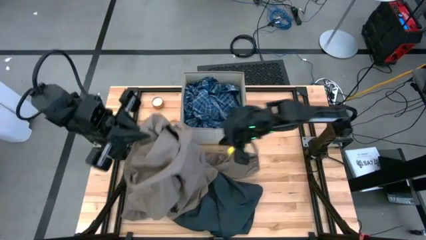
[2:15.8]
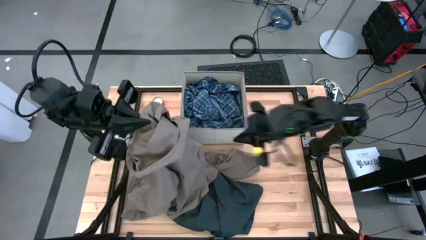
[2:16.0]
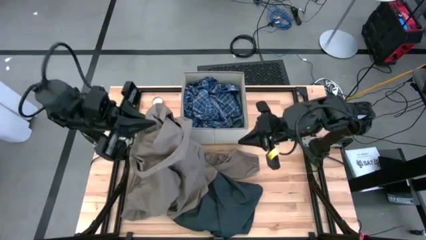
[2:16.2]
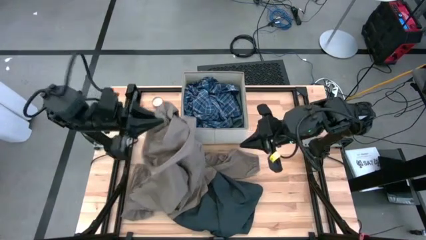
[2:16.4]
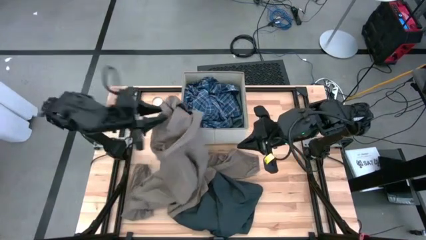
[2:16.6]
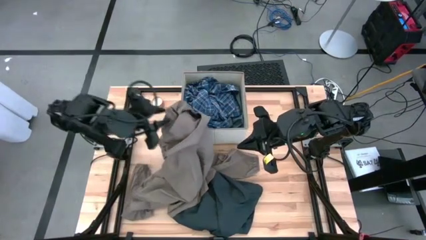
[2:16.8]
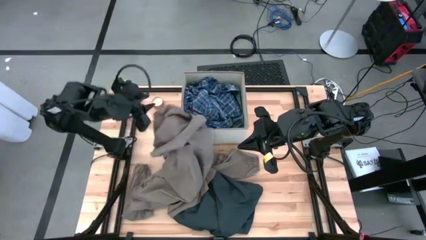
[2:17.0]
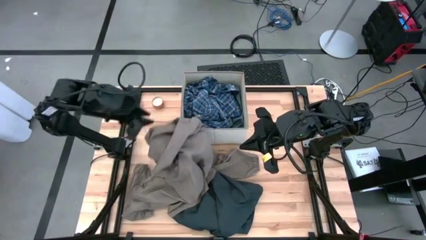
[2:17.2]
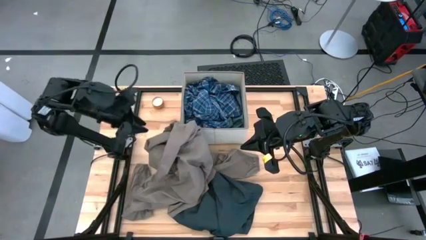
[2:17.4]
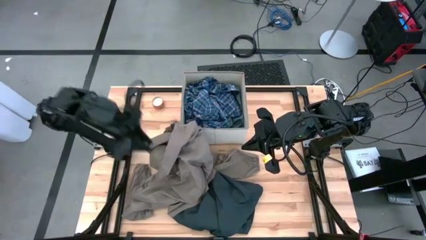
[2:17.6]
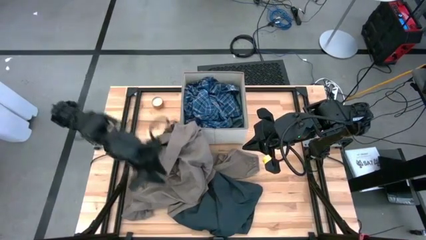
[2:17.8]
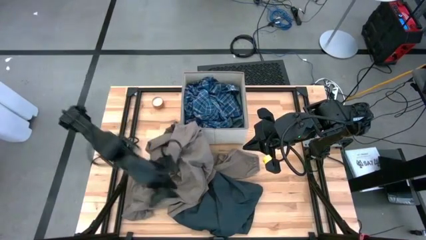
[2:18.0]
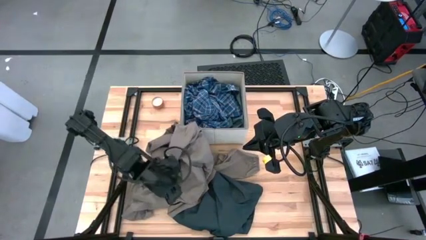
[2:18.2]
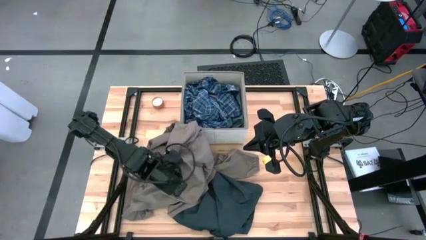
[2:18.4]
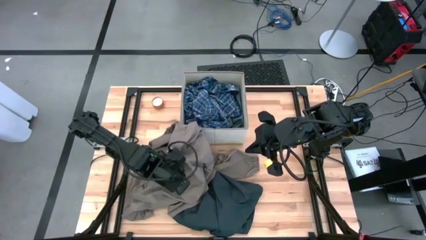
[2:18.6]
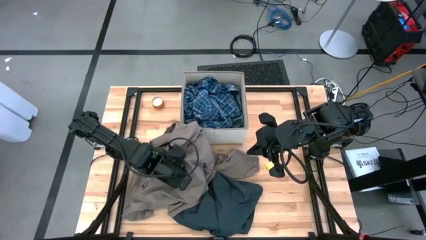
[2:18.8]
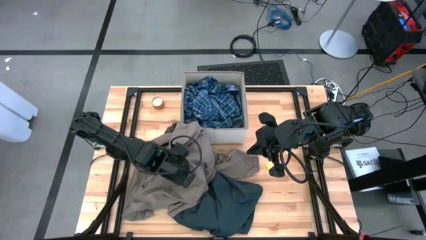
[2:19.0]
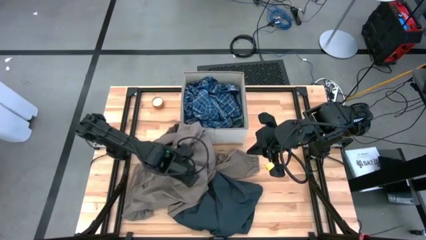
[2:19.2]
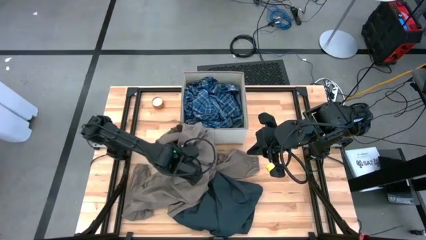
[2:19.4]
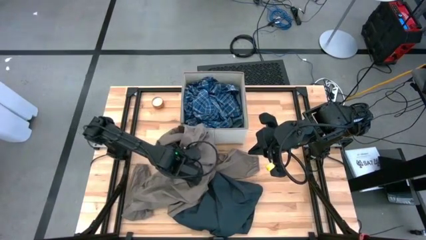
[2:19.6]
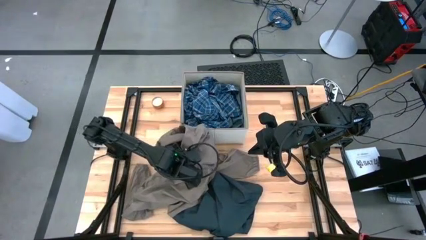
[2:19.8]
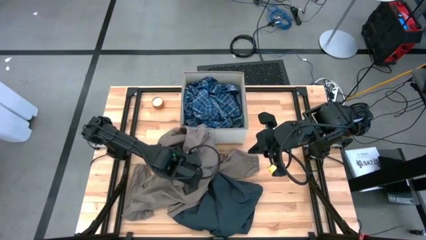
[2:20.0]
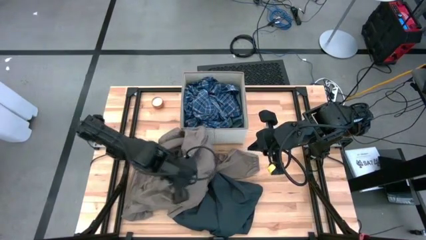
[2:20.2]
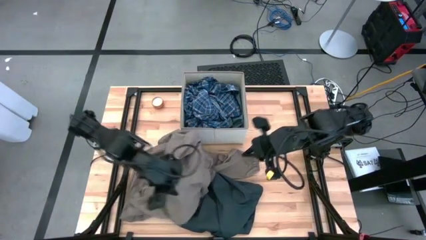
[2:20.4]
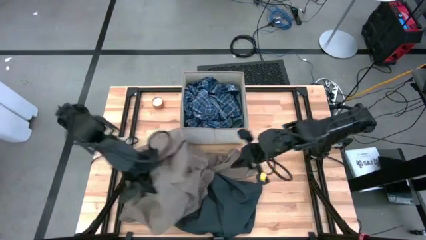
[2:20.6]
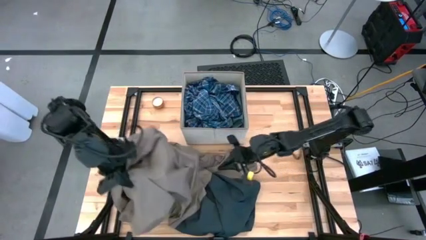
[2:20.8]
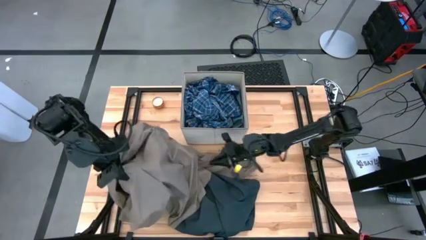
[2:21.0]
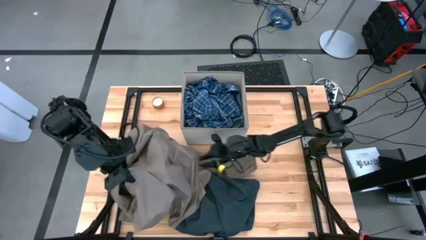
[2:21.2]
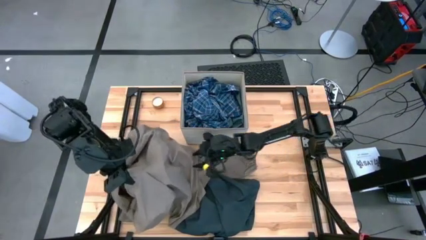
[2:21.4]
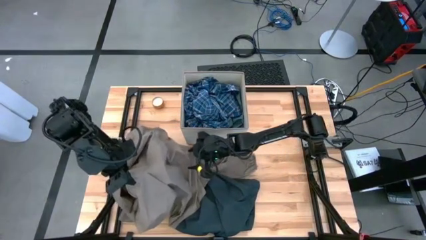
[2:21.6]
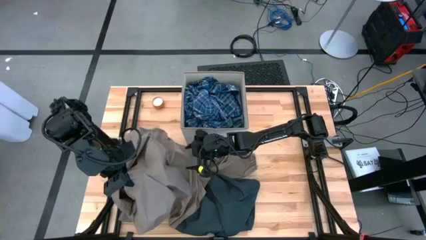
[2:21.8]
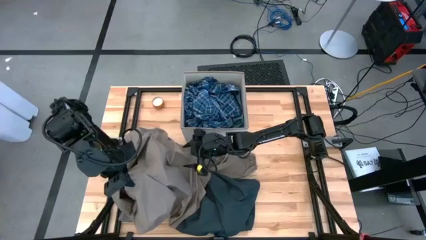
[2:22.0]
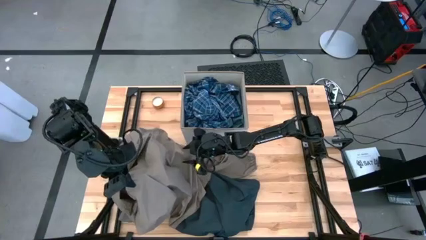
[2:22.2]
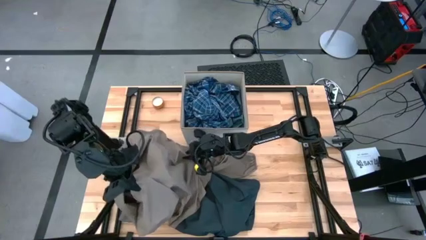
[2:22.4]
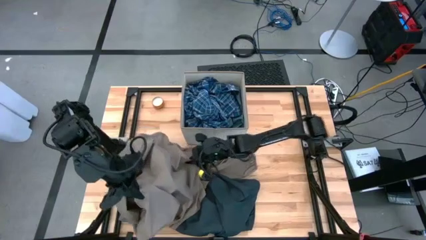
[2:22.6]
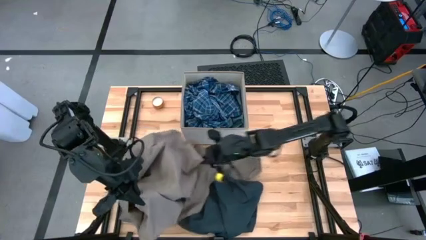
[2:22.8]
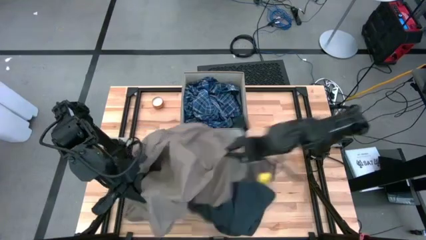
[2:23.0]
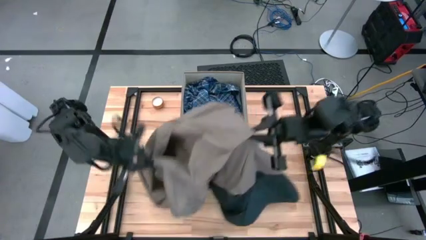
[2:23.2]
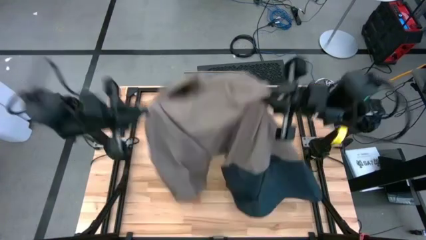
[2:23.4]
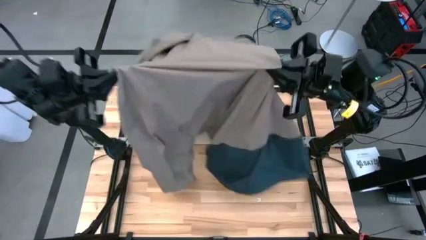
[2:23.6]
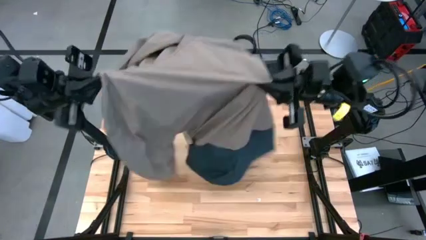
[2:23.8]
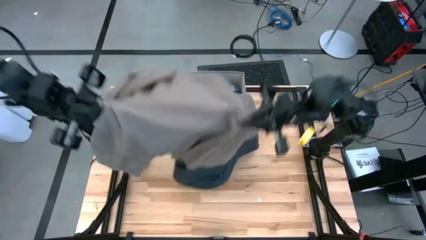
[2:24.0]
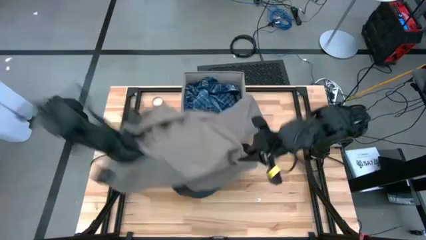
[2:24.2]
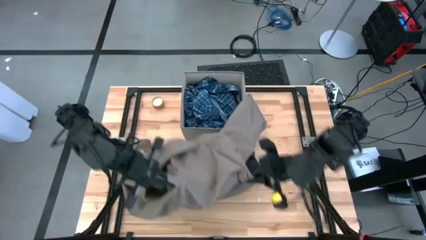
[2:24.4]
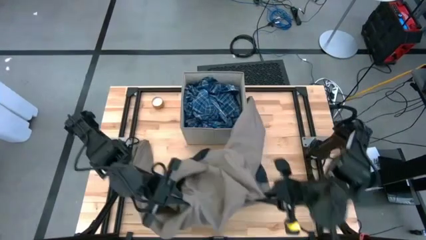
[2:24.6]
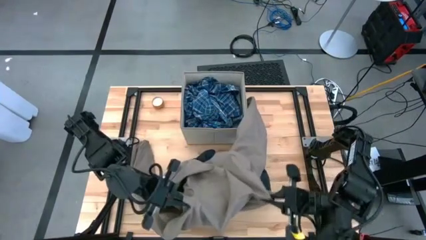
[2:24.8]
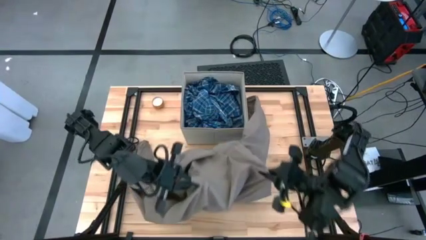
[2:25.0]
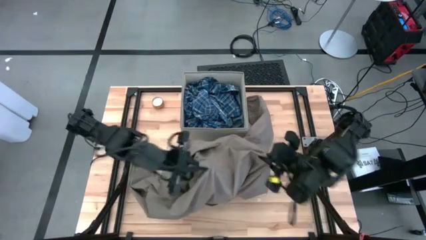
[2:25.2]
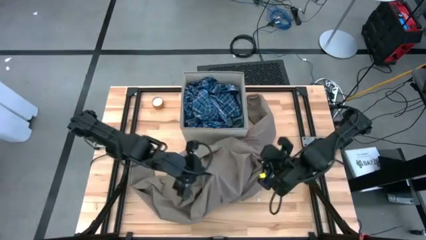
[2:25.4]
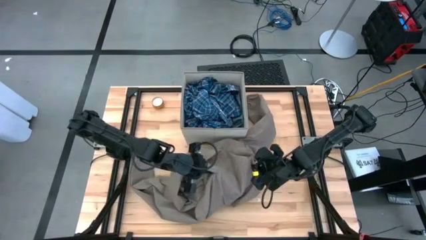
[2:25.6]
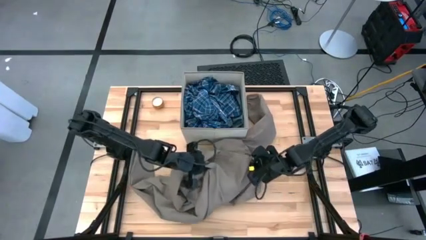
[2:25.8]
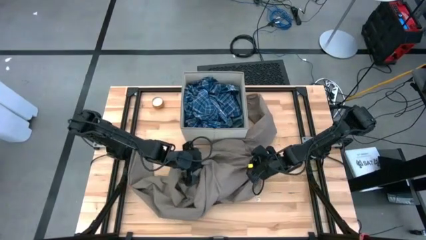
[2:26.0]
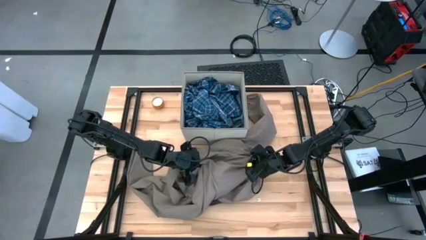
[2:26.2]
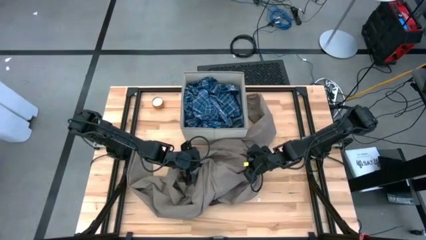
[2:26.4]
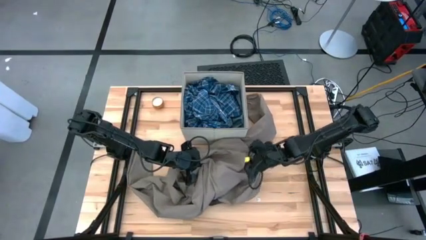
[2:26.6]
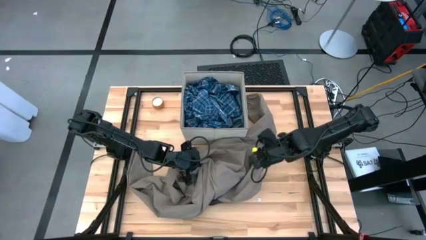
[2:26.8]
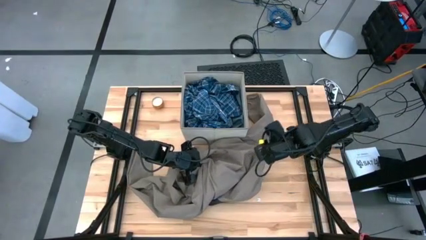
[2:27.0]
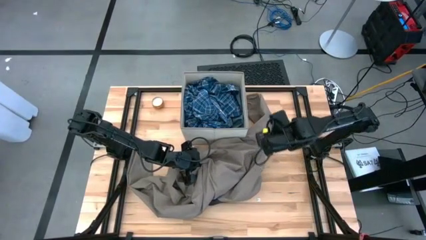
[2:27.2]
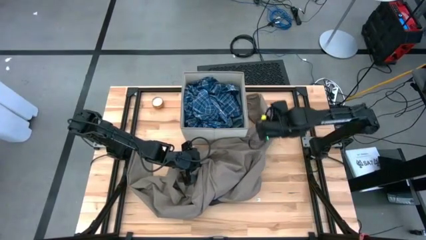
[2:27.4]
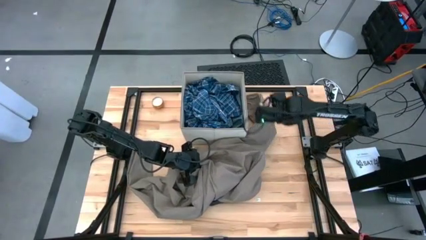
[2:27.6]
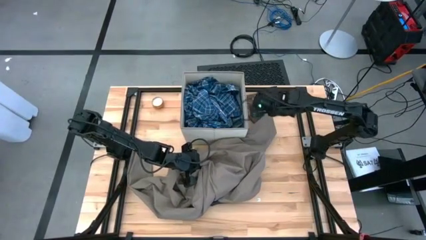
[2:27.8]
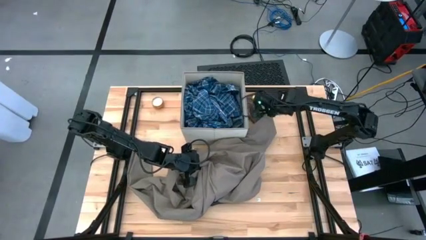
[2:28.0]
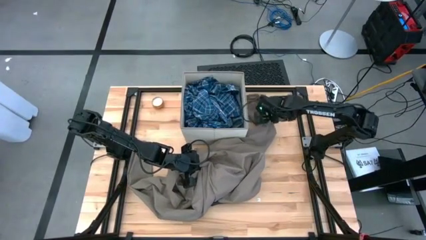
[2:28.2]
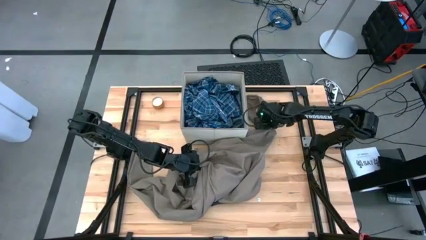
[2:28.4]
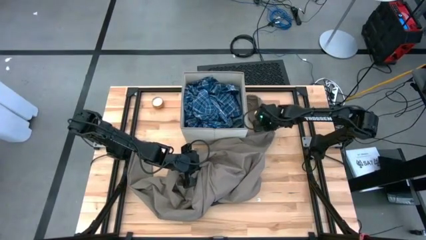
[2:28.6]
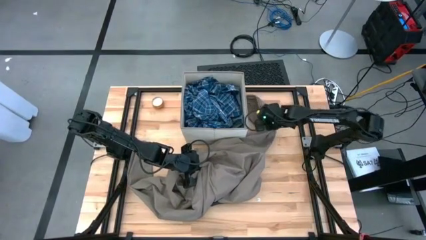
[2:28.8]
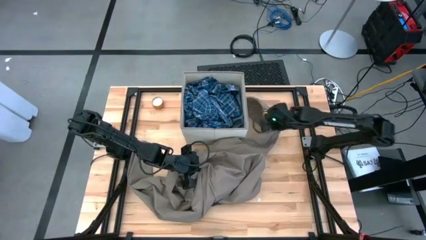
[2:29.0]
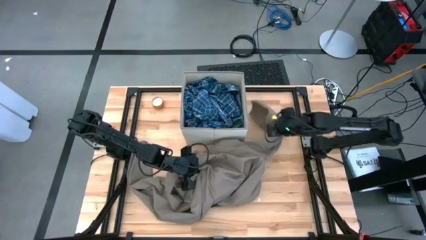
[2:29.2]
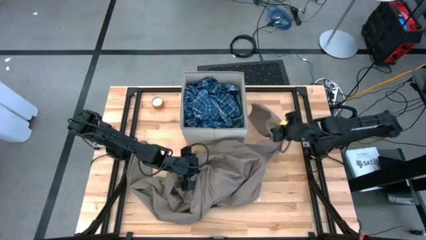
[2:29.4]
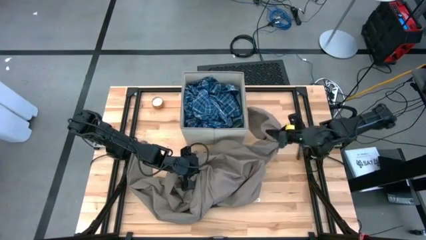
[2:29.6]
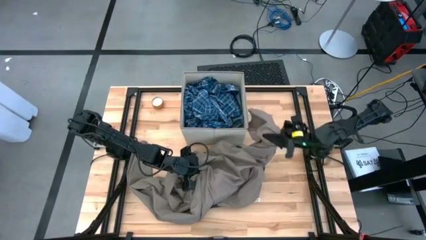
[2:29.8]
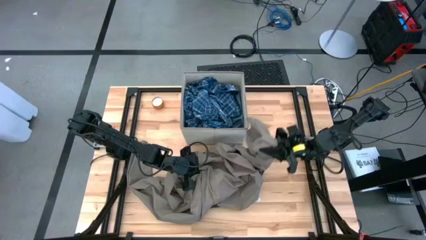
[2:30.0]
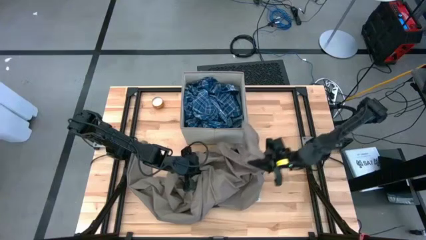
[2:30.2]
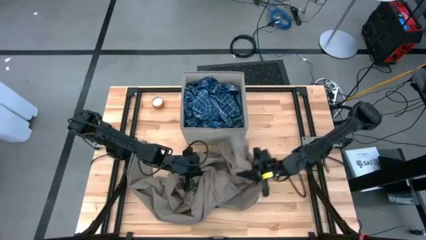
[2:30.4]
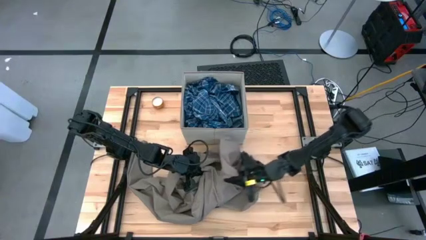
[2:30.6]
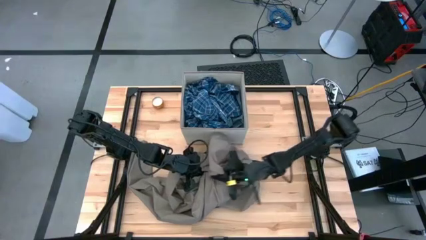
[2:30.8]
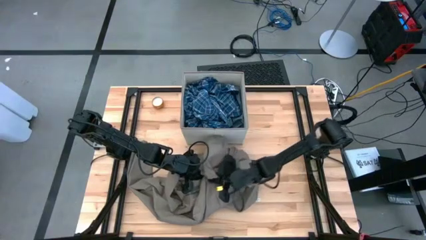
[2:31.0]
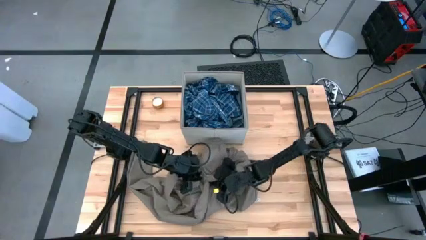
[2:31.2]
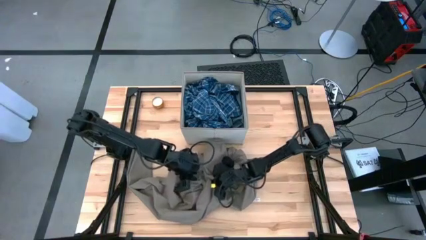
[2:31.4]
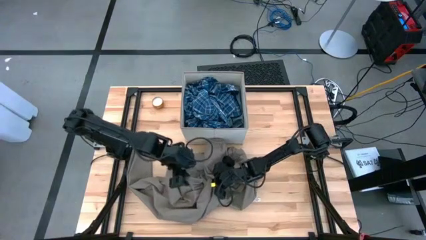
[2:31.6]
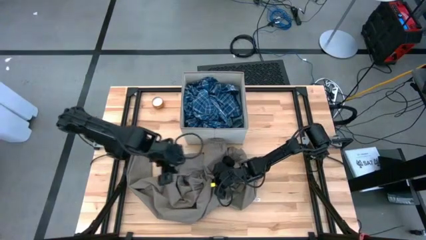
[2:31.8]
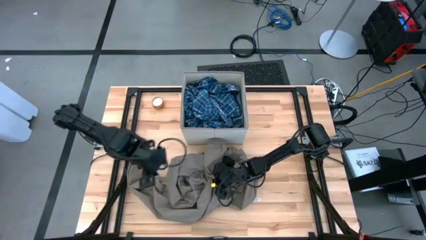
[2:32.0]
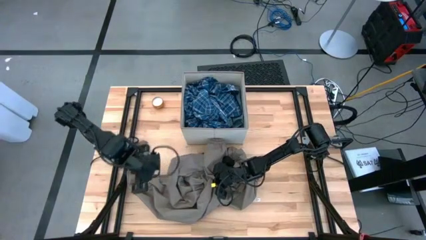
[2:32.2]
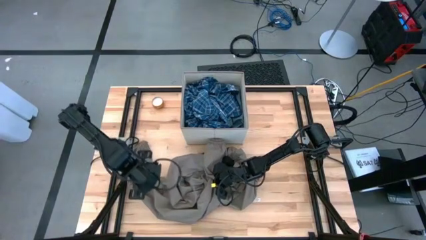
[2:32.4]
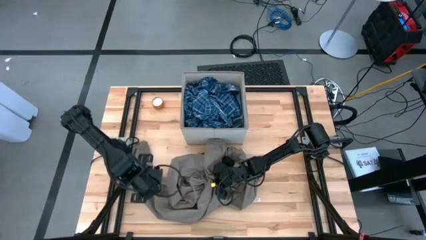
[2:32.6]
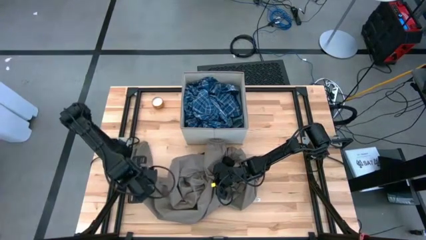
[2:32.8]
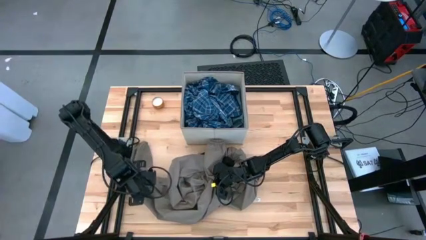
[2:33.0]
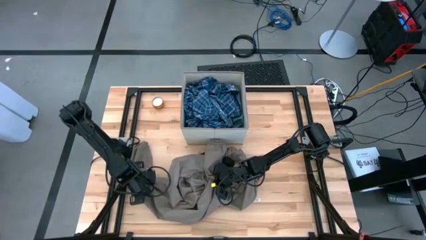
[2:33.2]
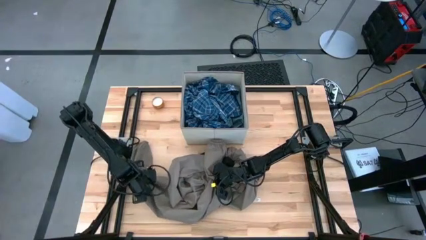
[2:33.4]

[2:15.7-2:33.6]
Task: Sort clothes
Put the brown jacket into the laundry bin
